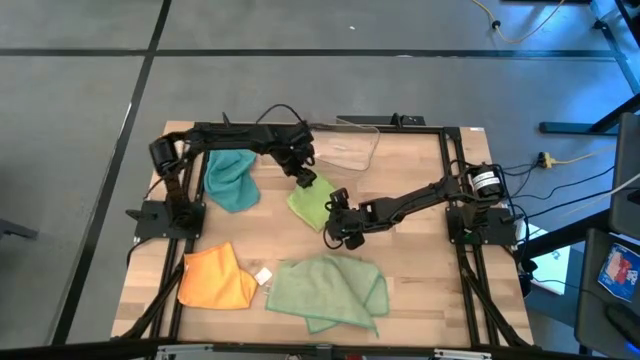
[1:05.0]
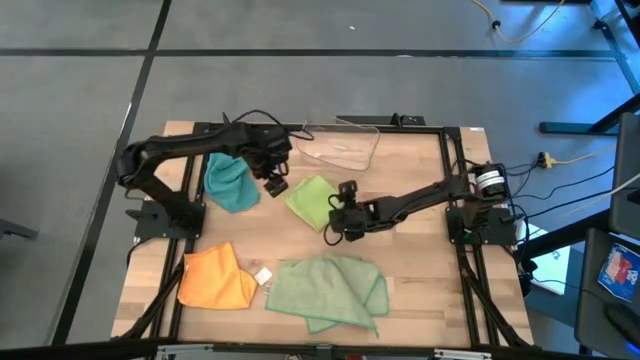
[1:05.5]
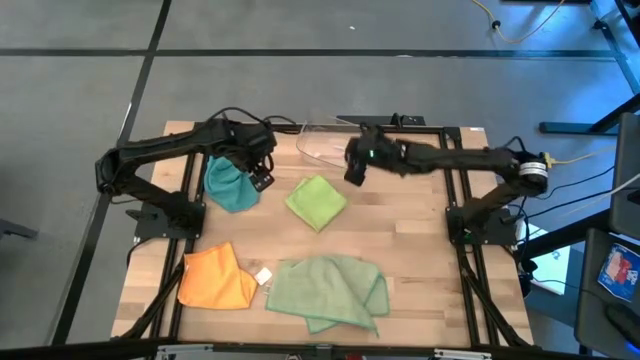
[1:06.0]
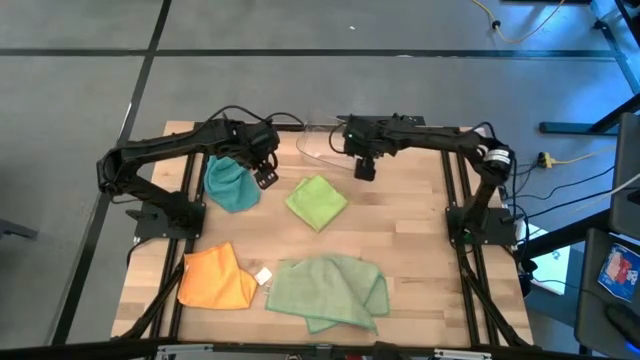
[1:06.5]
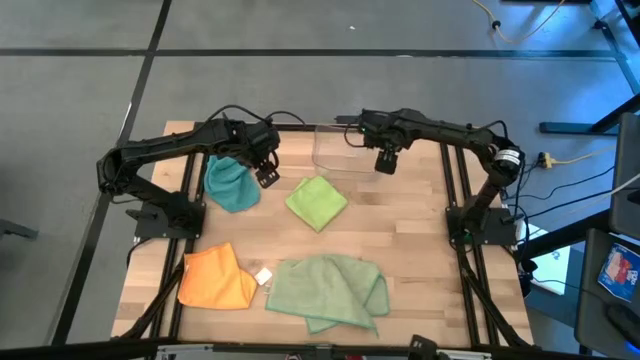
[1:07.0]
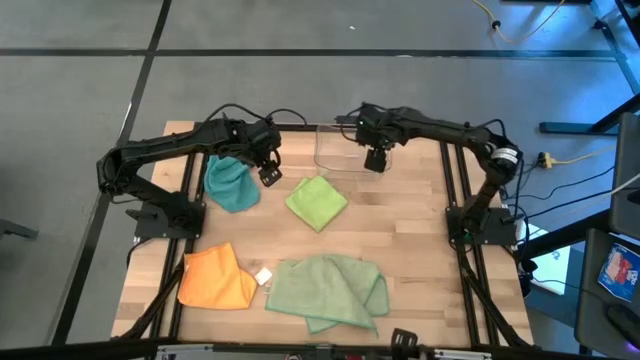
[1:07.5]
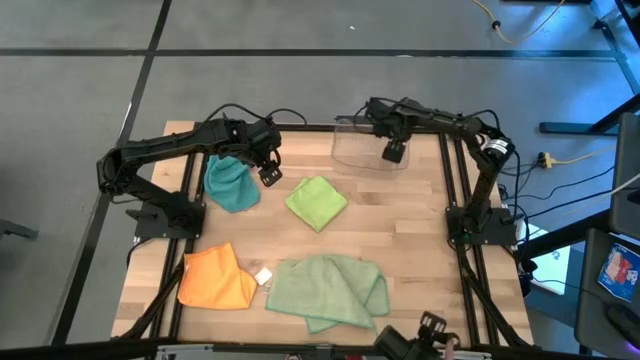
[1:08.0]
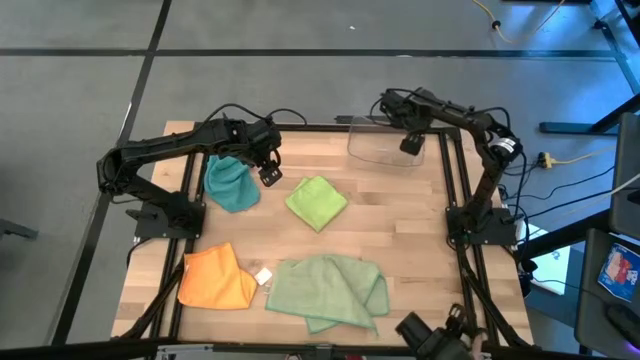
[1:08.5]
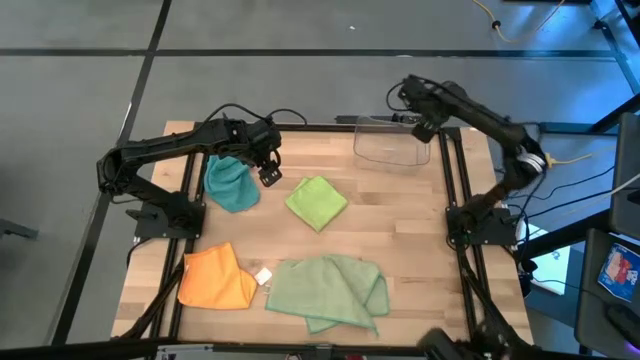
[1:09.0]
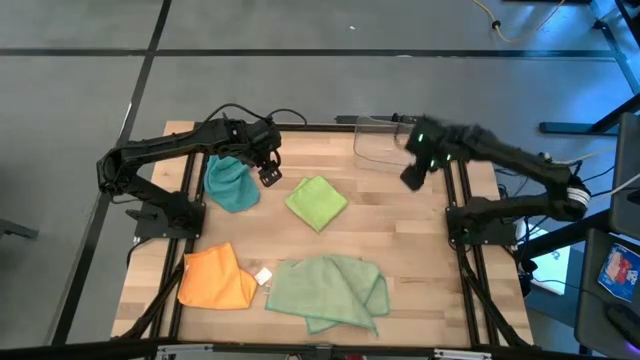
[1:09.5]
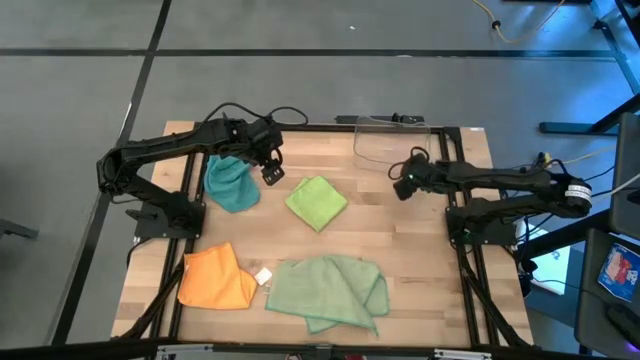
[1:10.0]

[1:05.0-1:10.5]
Task: Fold microfiber towels
Adjust the transparent bin

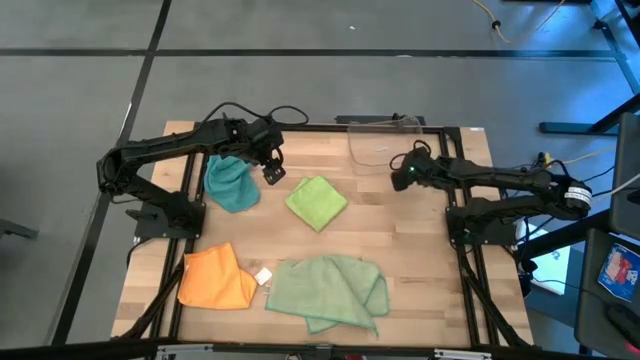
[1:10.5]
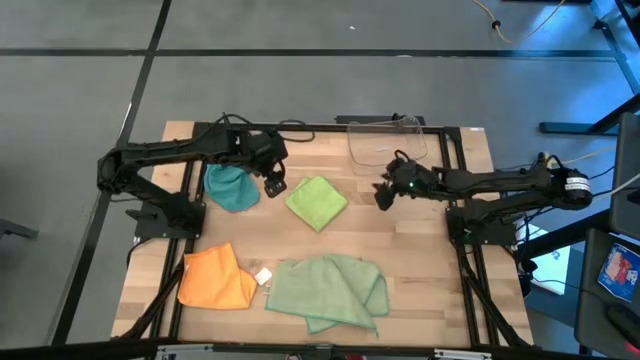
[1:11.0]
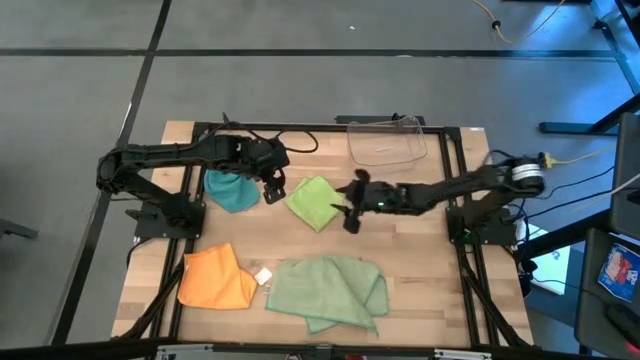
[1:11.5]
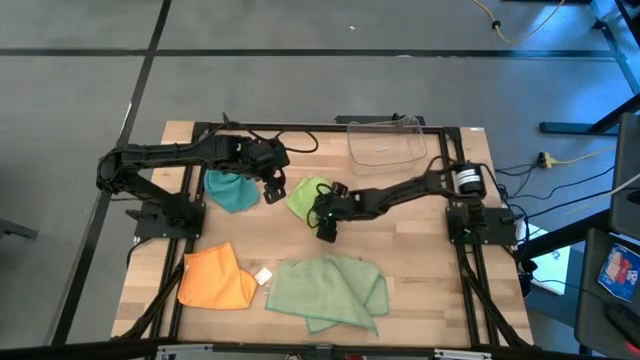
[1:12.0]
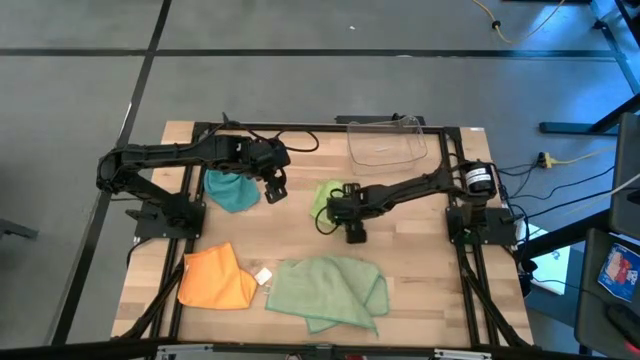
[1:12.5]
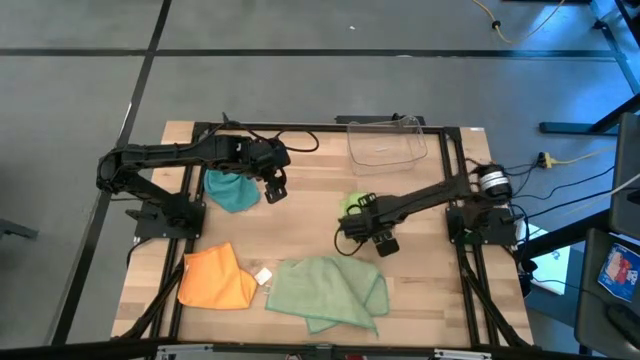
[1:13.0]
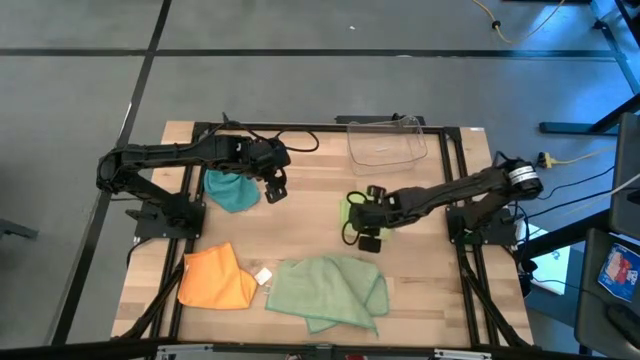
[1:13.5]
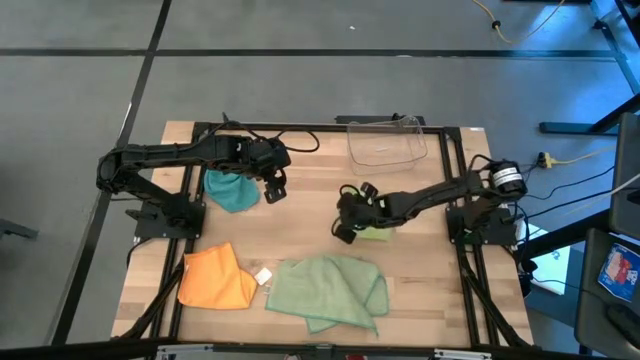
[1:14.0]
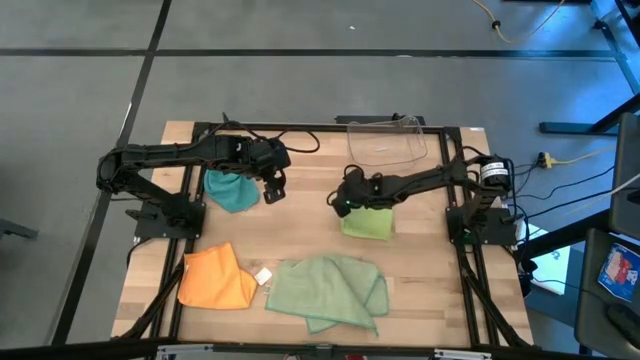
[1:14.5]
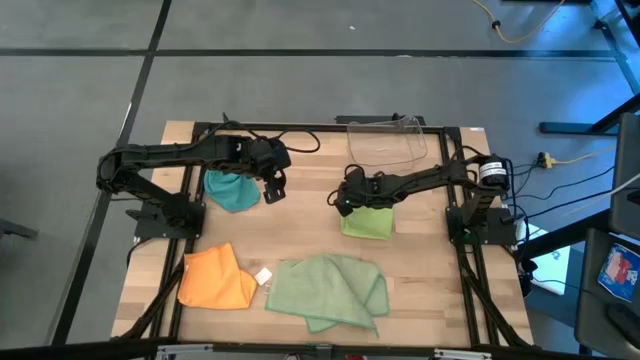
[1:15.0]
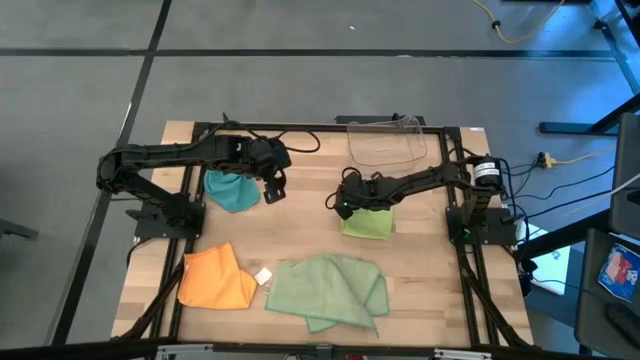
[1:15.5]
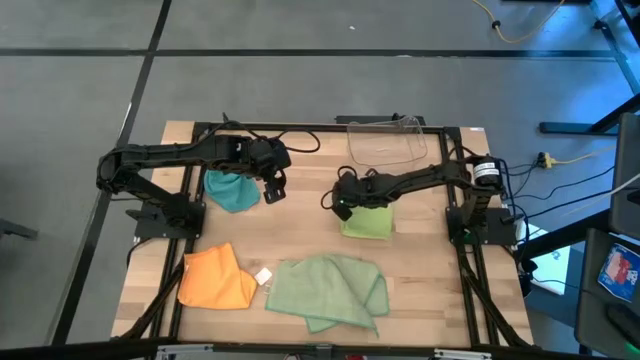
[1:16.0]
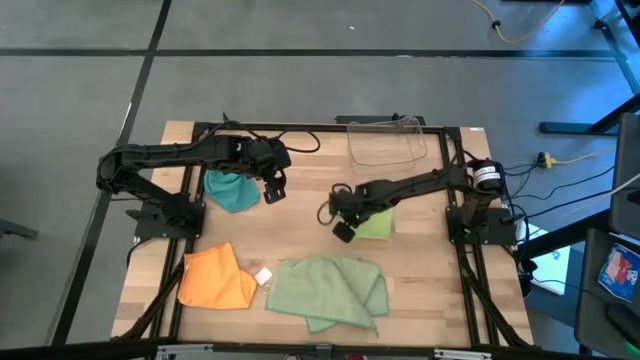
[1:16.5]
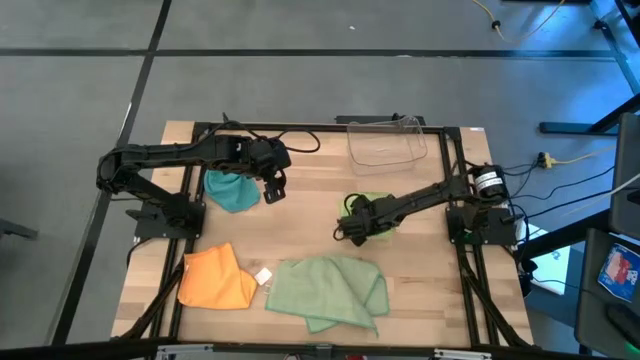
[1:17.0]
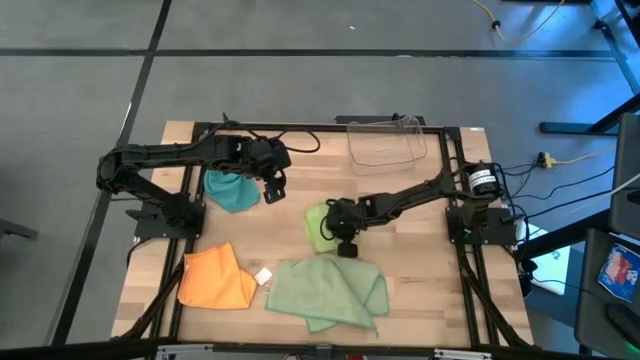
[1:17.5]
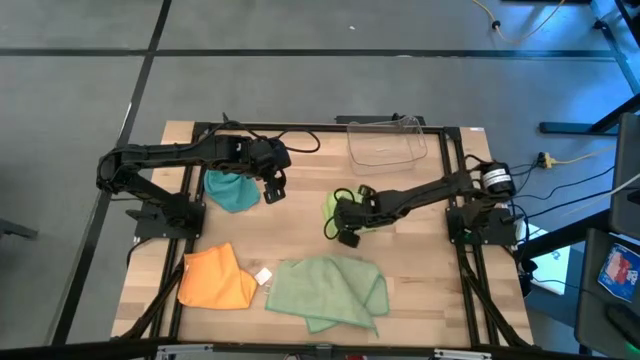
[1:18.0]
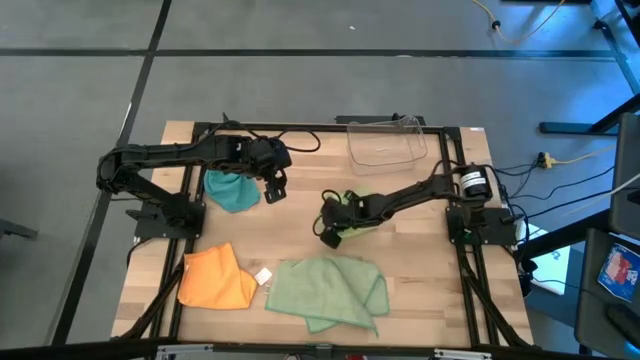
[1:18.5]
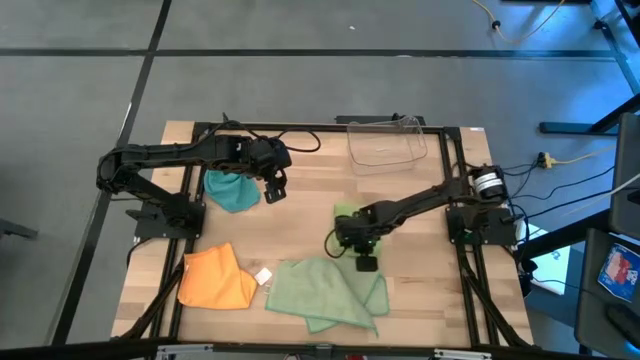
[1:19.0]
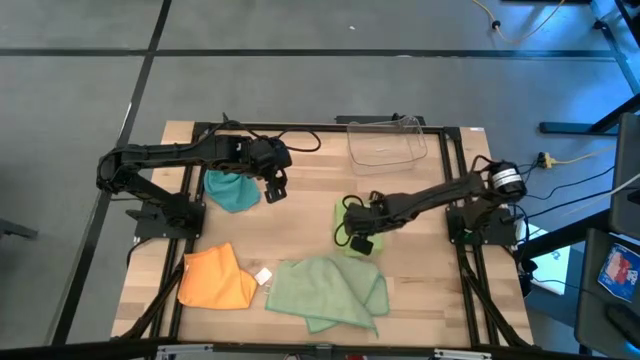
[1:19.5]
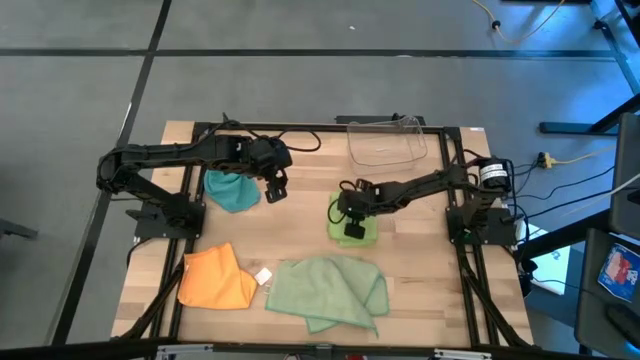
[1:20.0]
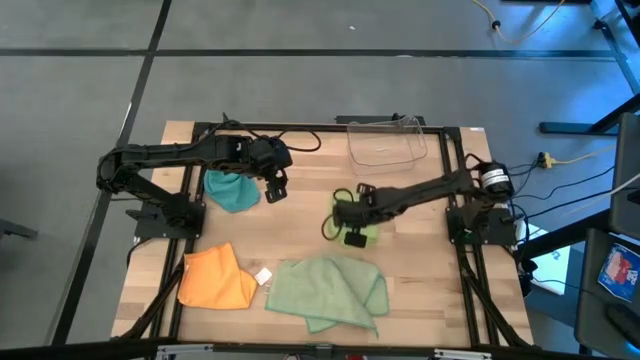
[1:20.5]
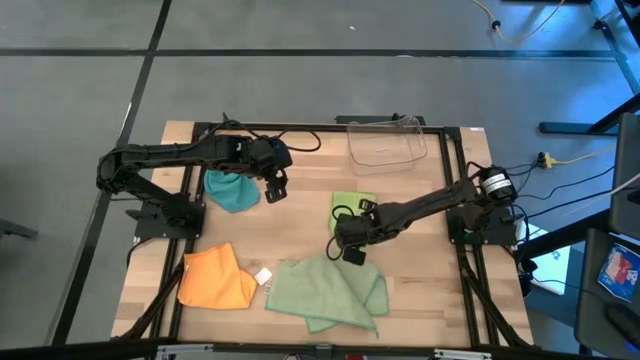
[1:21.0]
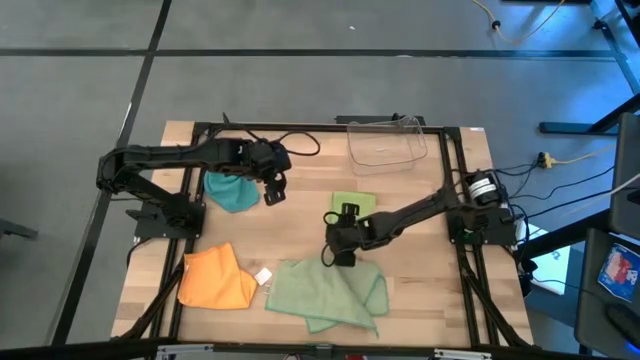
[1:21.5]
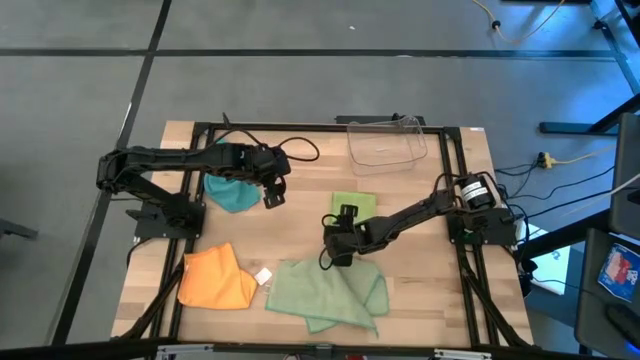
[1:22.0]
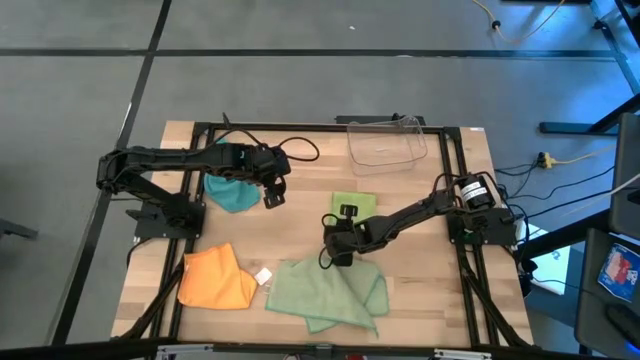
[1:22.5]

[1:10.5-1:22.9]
Put the light green microfiber towel in the transparent bin
